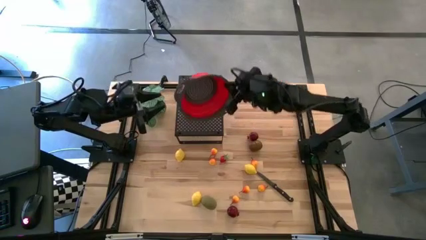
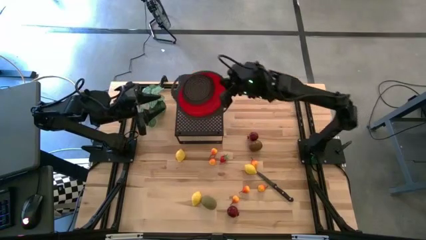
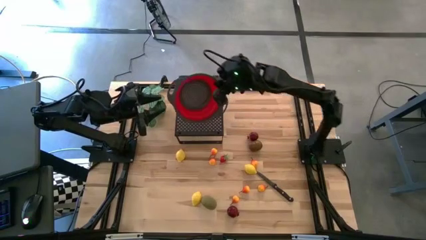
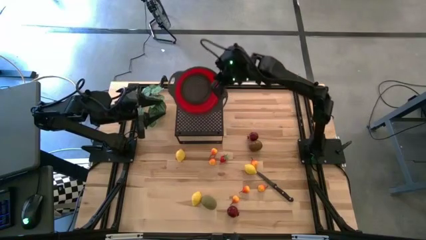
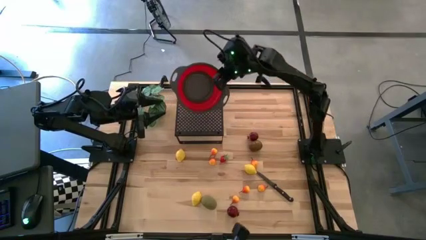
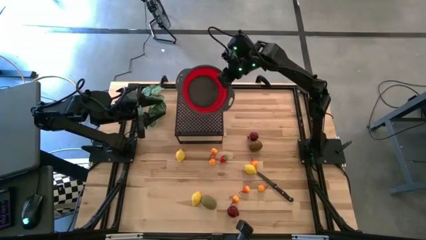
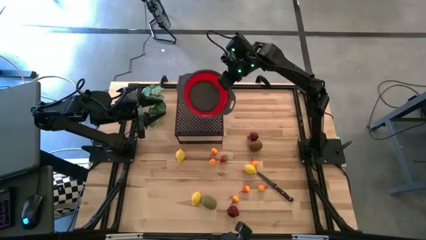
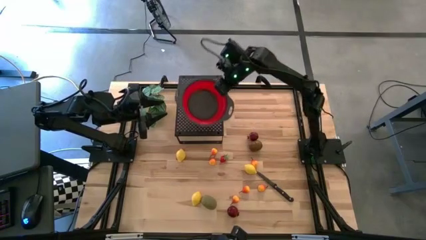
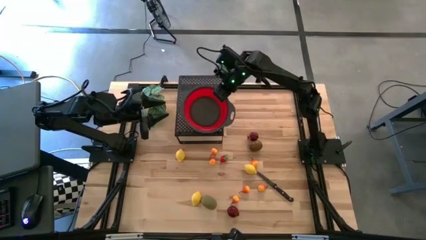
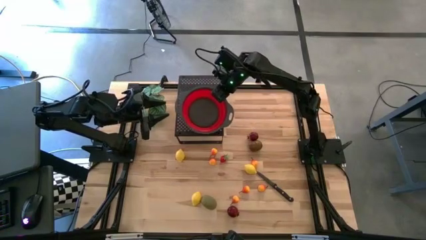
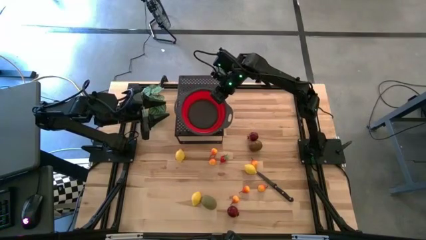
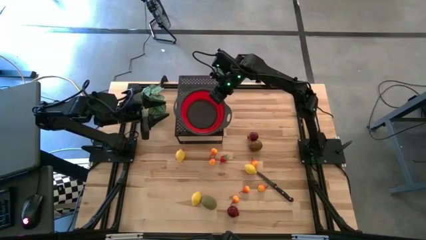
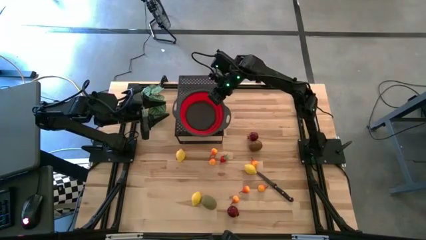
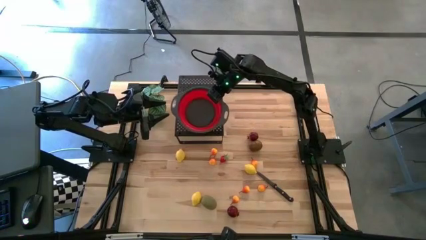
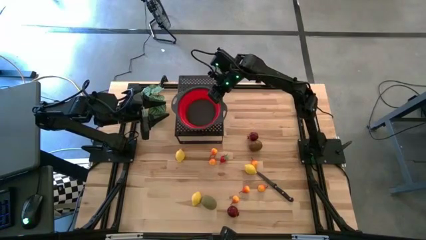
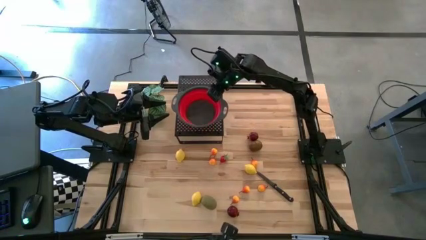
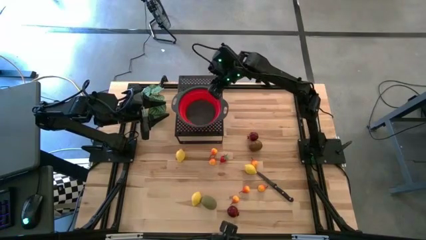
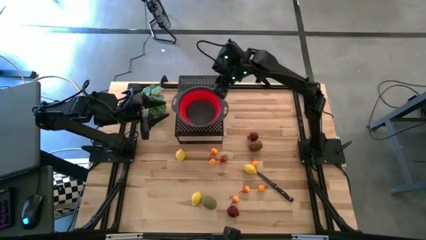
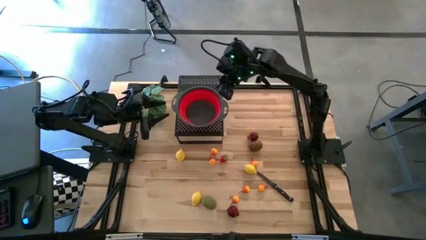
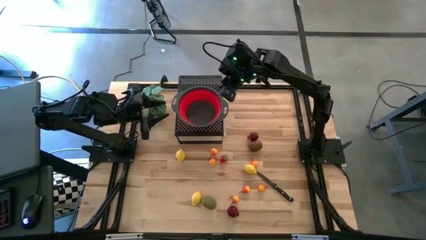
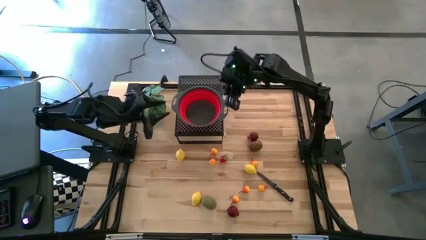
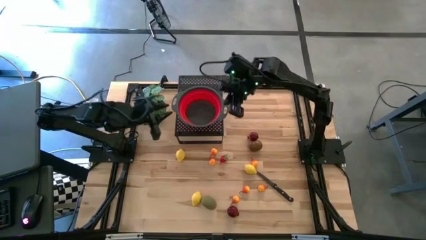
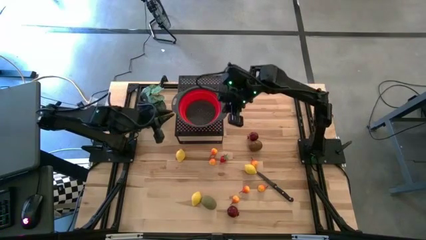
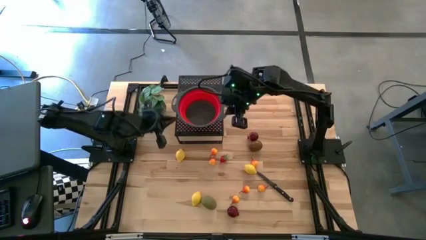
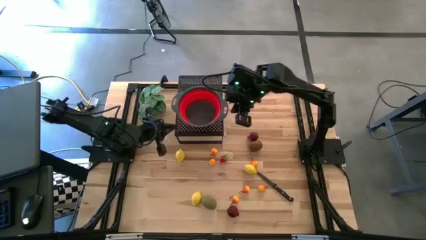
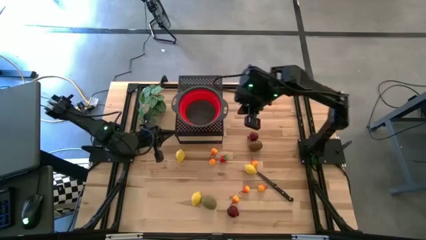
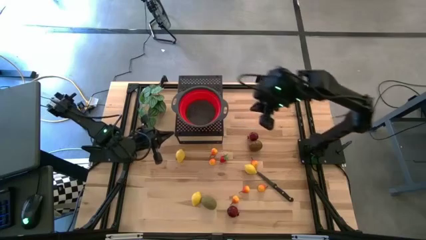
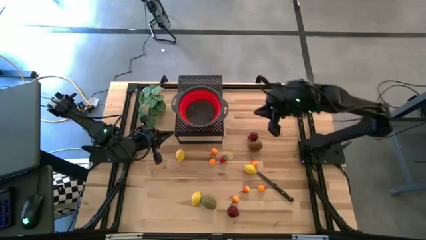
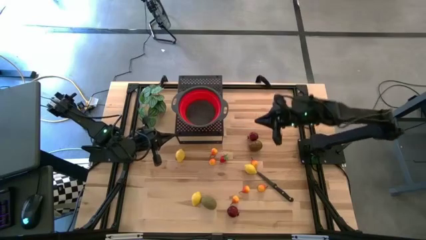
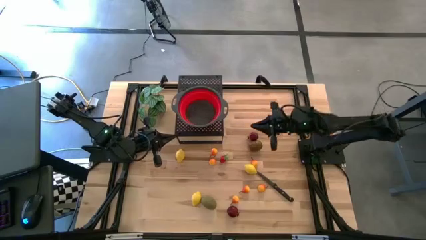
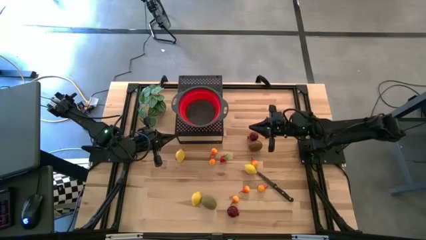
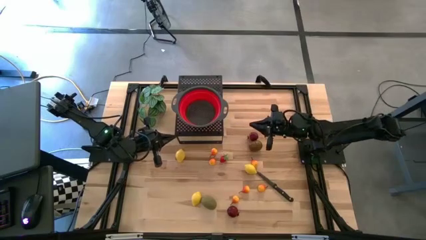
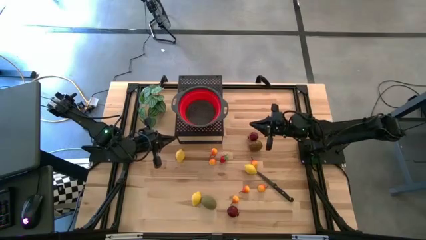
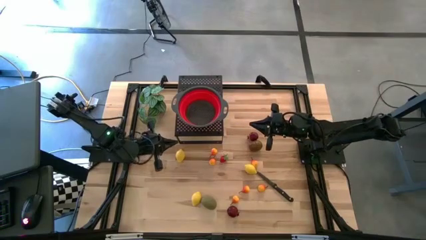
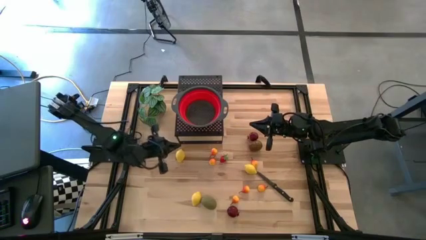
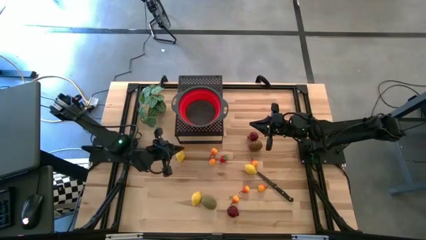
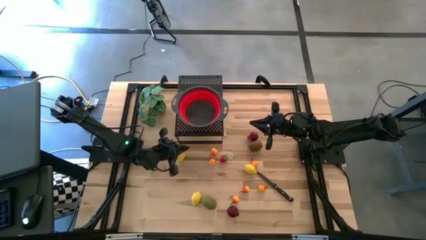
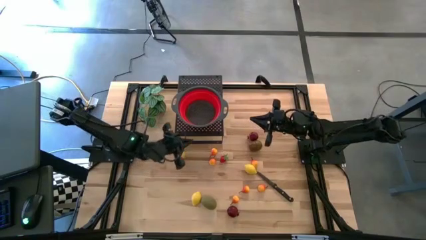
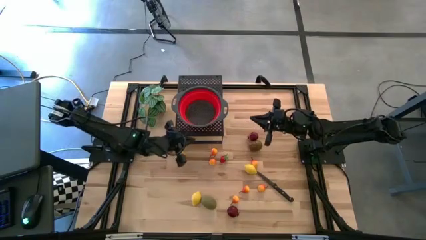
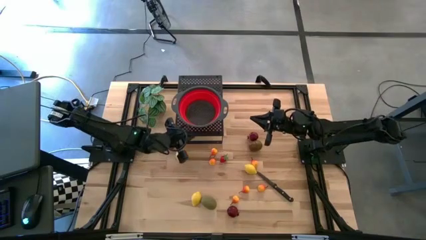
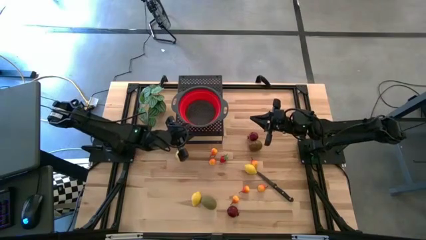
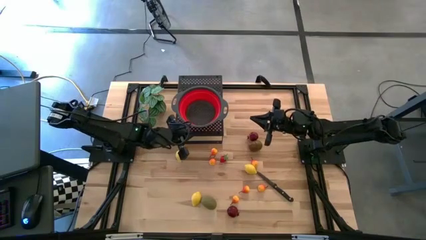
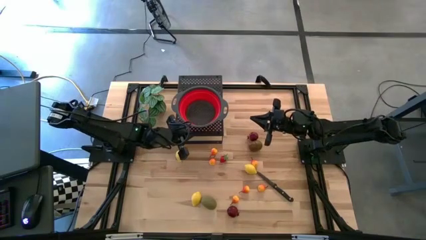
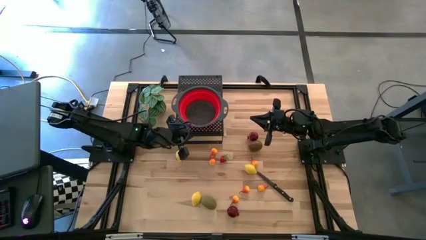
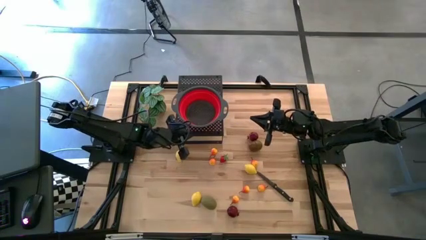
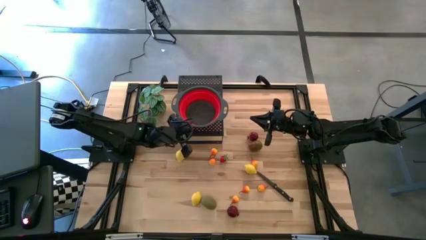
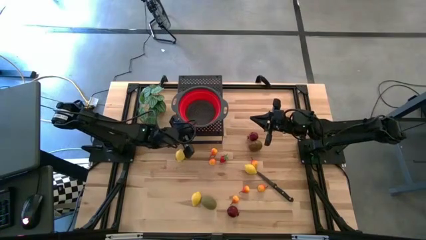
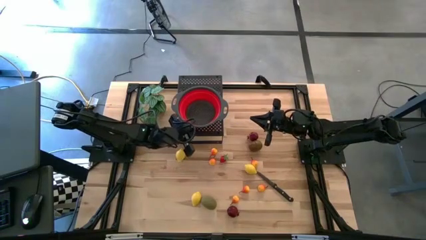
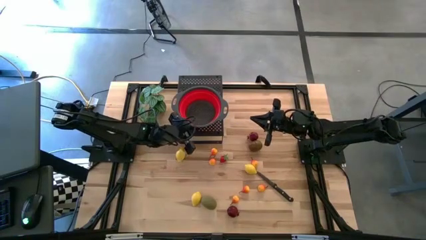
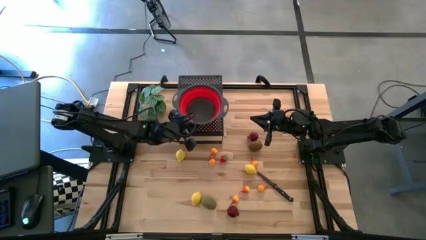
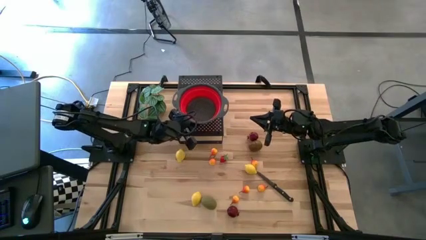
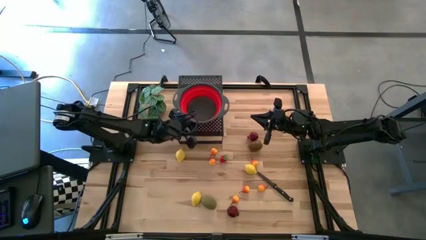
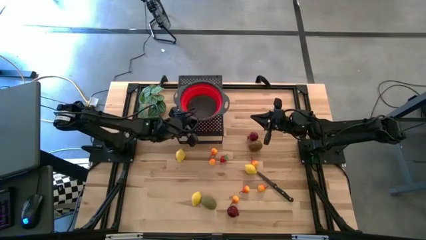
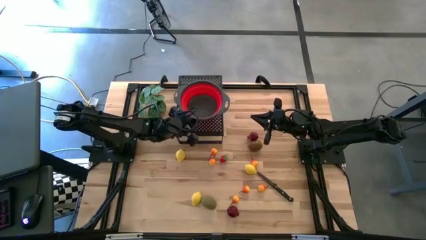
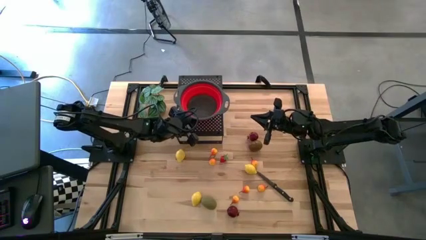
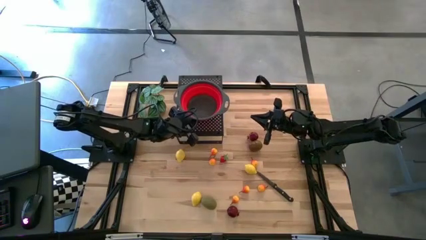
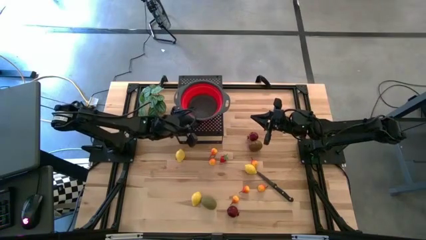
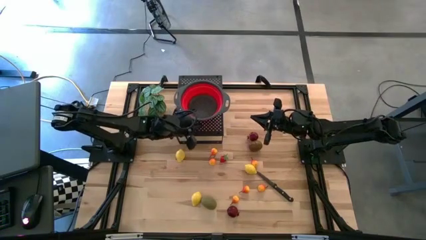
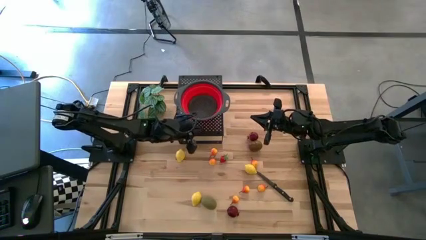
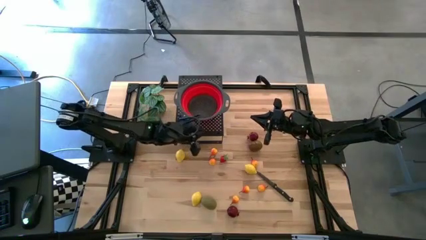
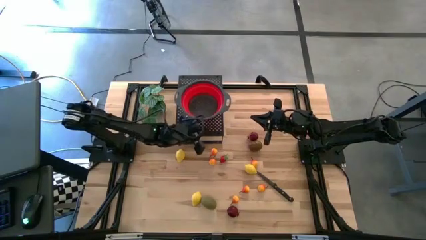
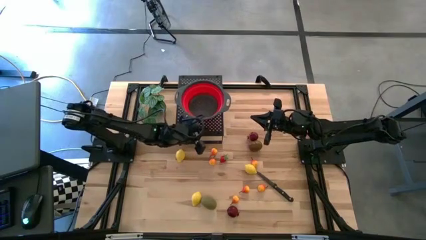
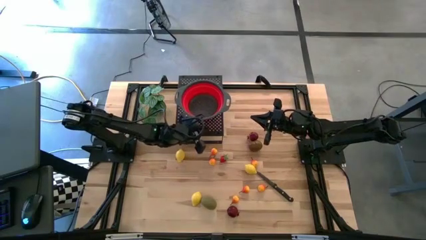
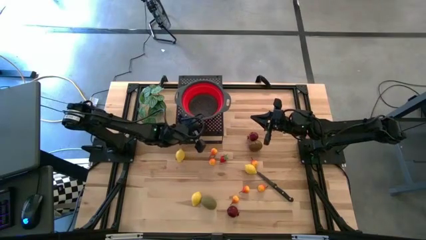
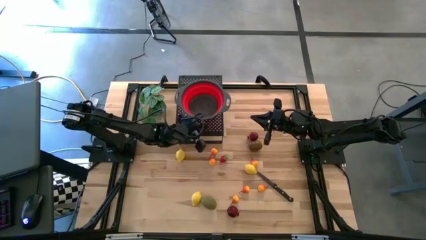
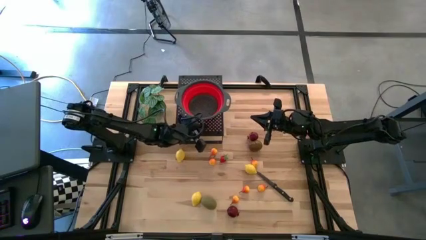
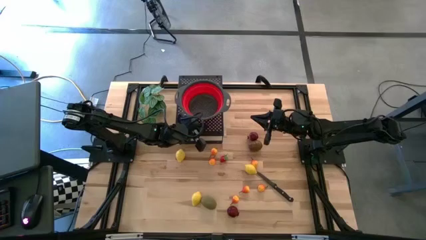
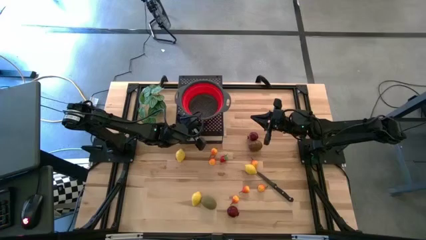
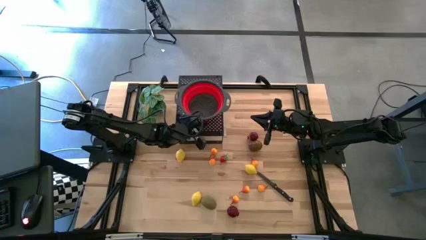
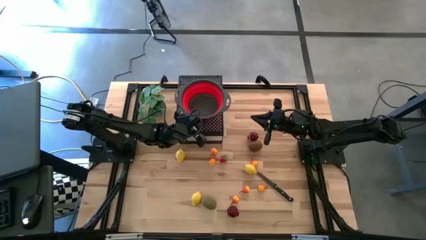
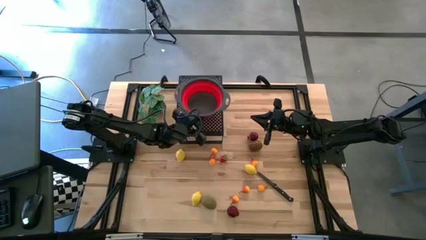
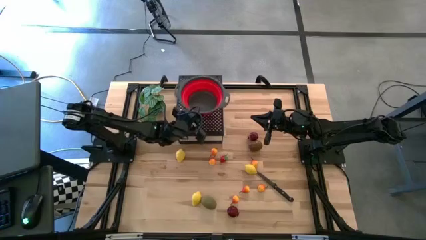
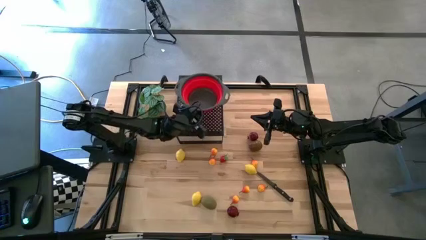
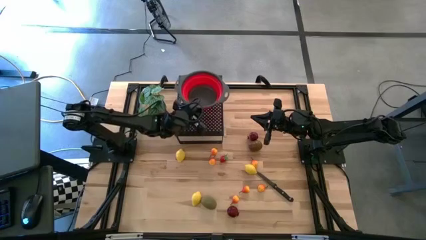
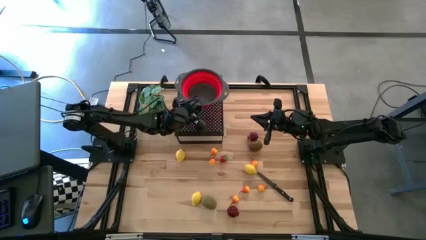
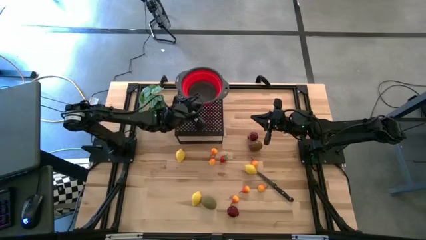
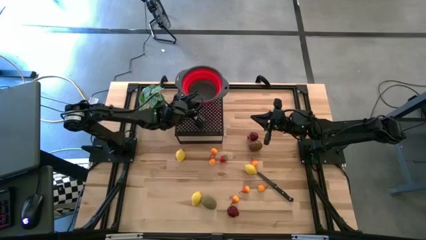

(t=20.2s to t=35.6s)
Task: Pick & Place Fruit
Put the red strainer bowl on the shelf
